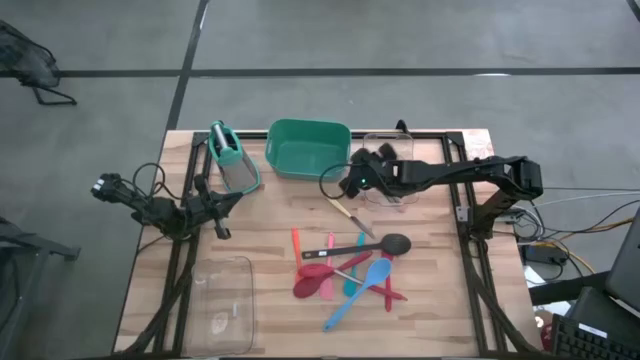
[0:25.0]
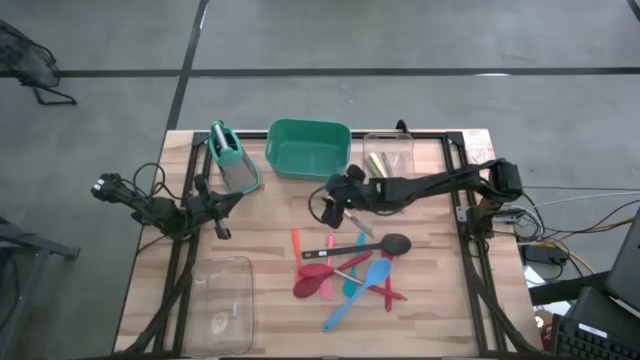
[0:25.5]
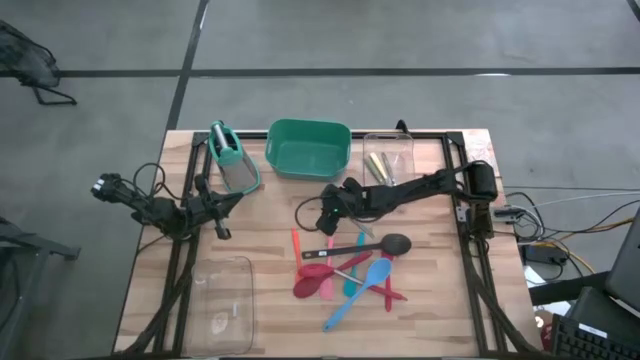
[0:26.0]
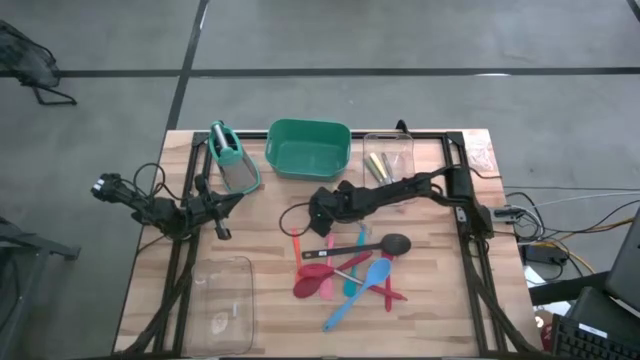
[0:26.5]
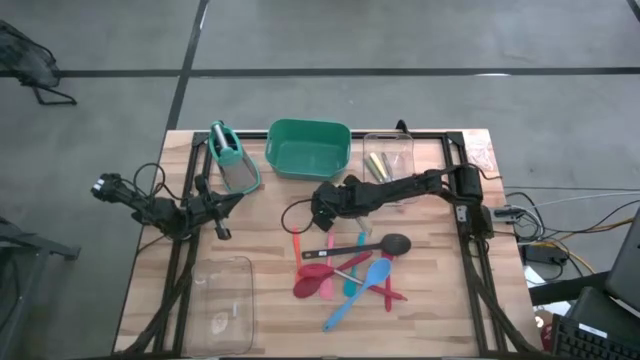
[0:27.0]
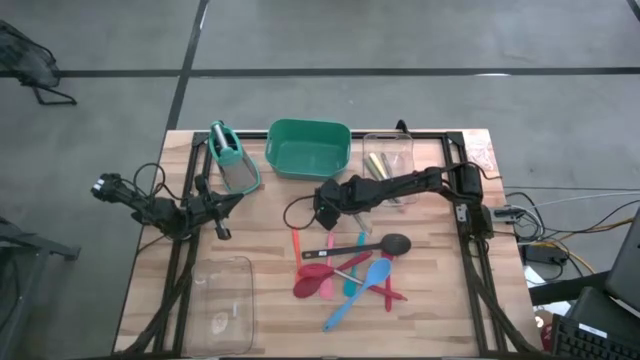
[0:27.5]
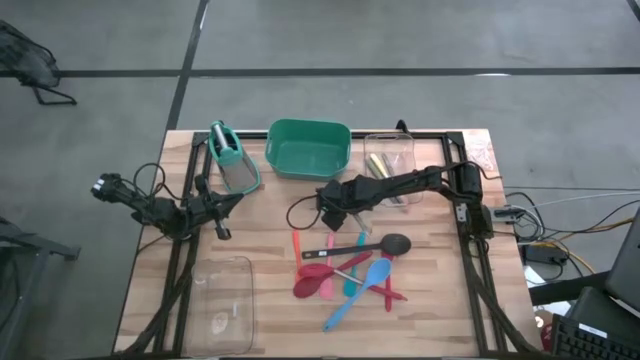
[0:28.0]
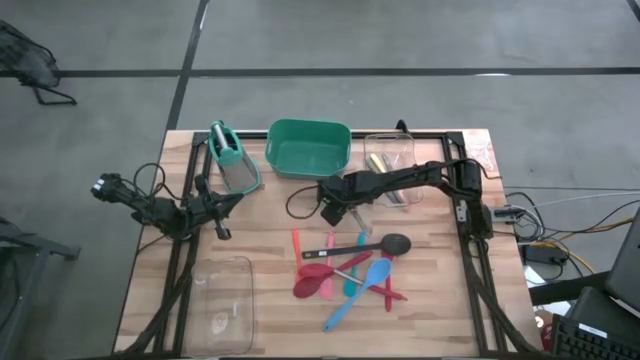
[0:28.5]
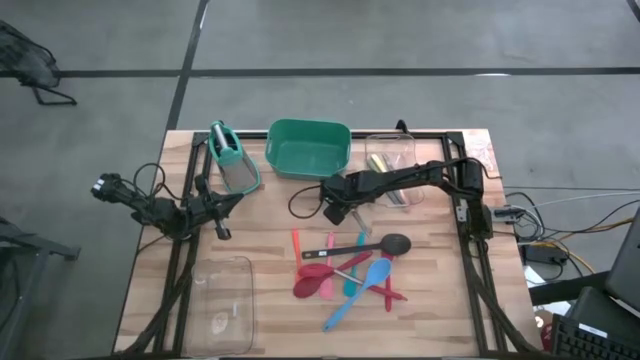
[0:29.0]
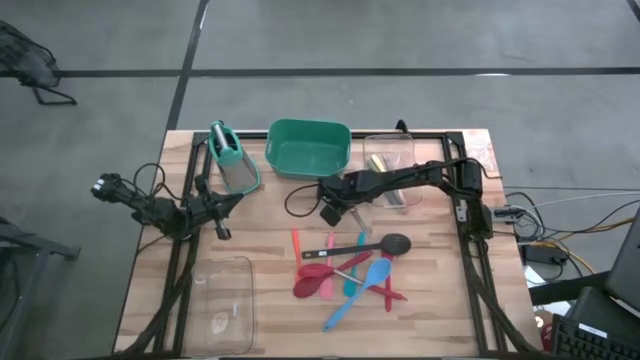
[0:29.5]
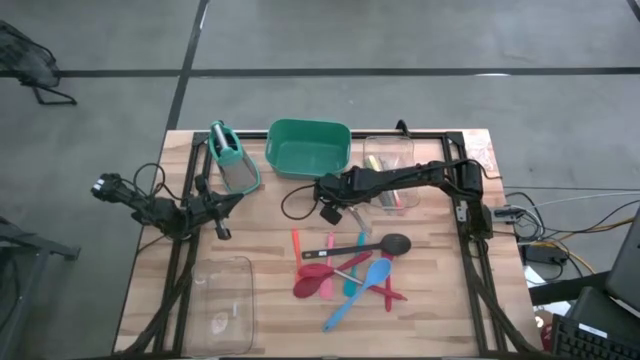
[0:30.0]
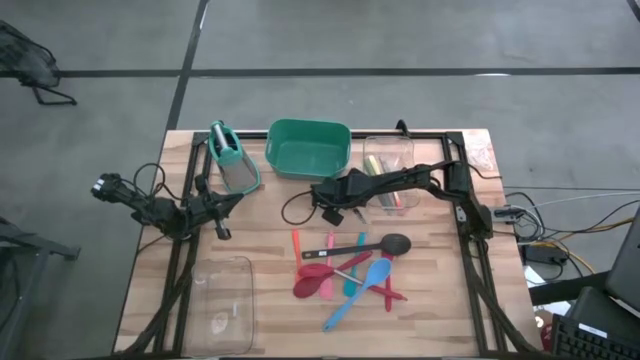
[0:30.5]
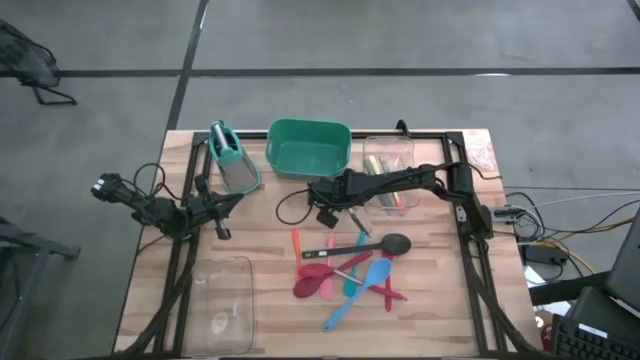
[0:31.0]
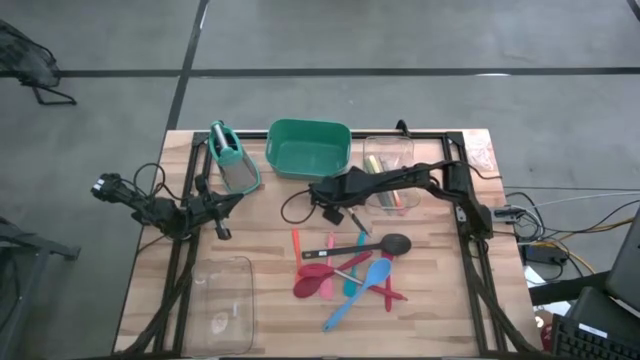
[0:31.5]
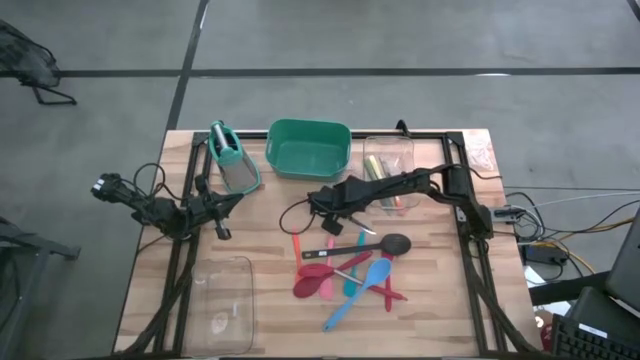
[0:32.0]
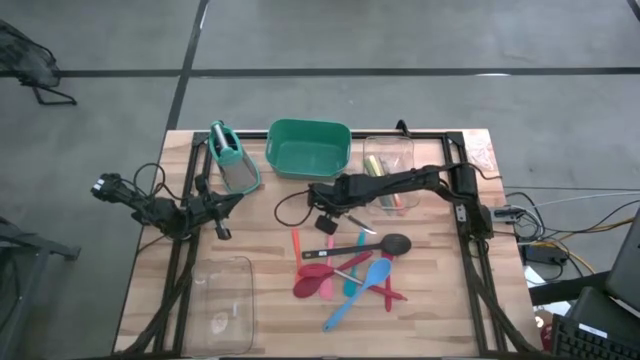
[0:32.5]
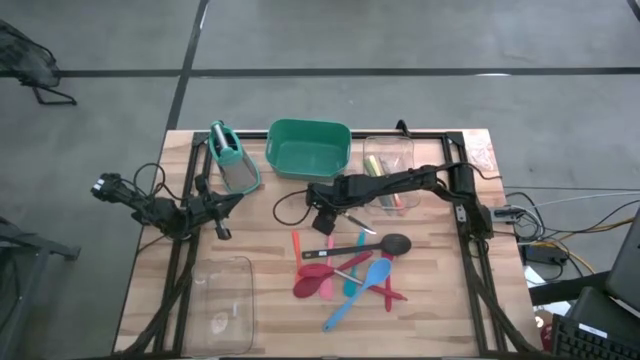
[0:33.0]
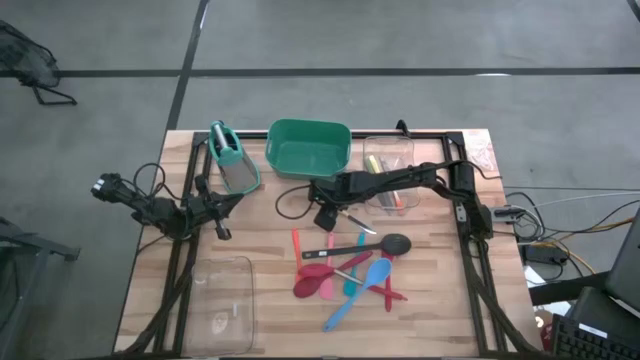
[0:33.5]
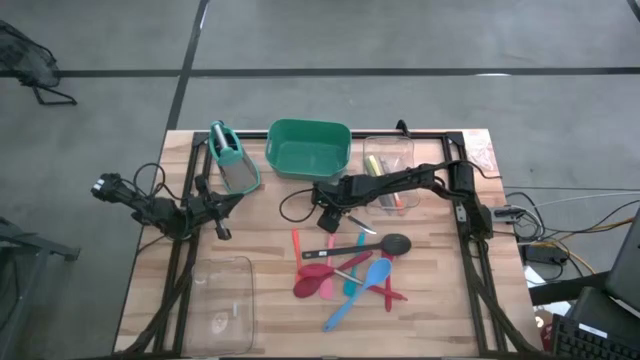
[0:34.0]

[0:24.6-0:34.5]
Task: Pick & Place Kitchen Items
Put the yellow knife into the top transparent bin

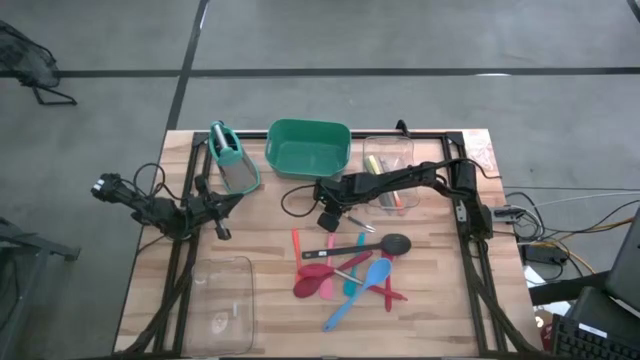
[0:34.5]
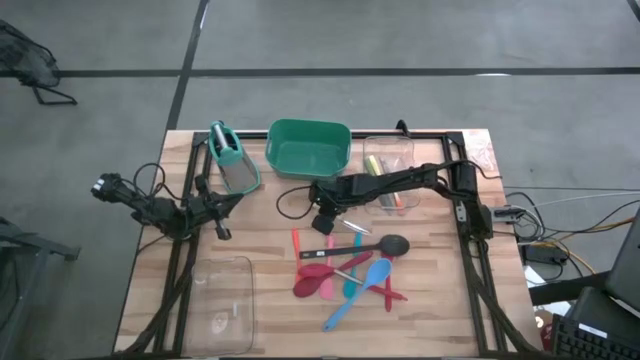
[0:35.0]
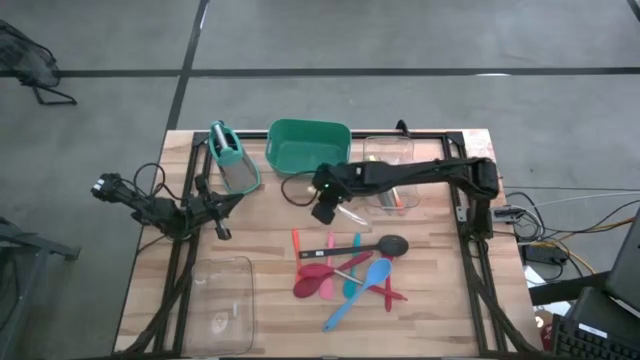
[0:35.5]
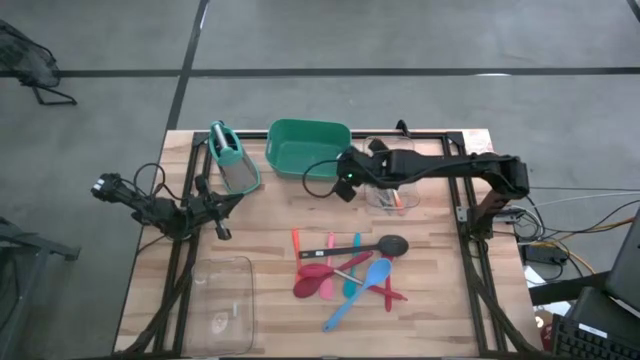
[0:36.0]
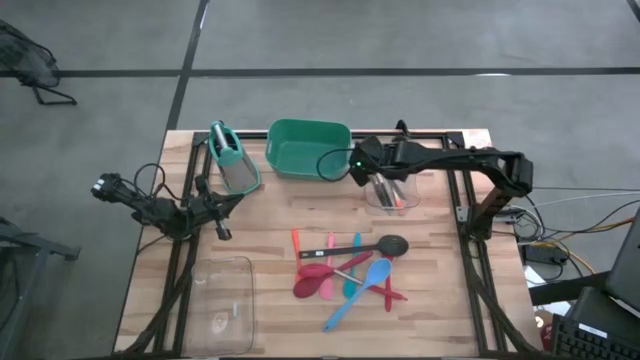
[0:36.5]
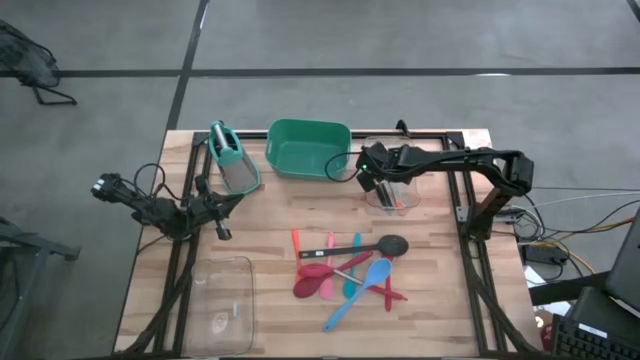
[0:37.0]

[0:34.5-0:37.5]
Put the yellow knife into the top transparent bin

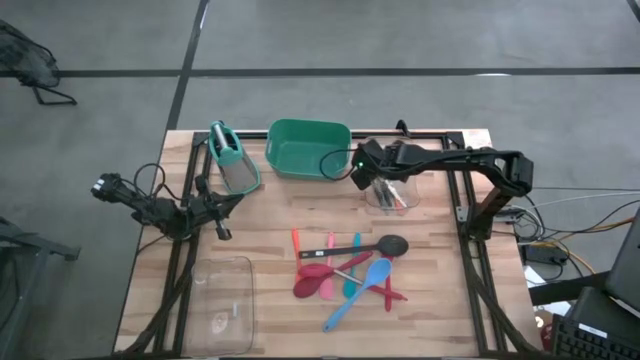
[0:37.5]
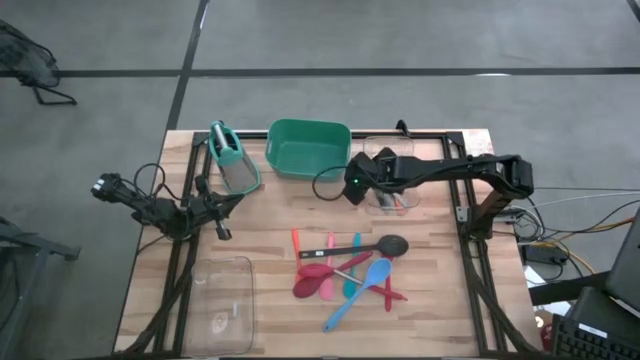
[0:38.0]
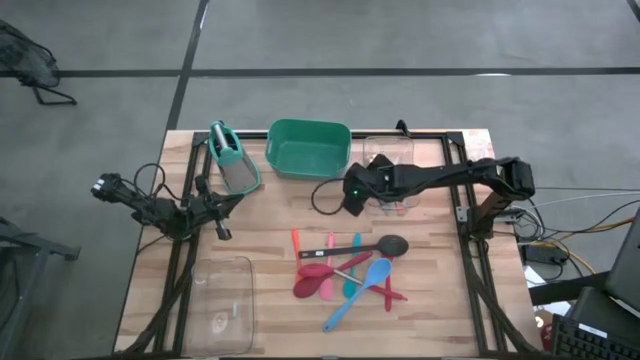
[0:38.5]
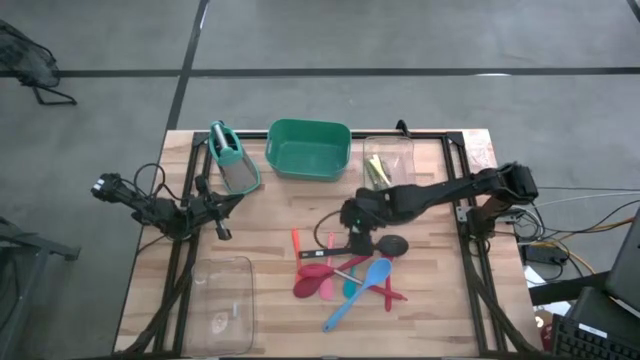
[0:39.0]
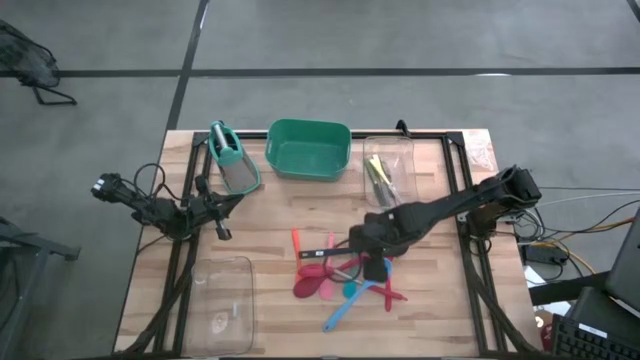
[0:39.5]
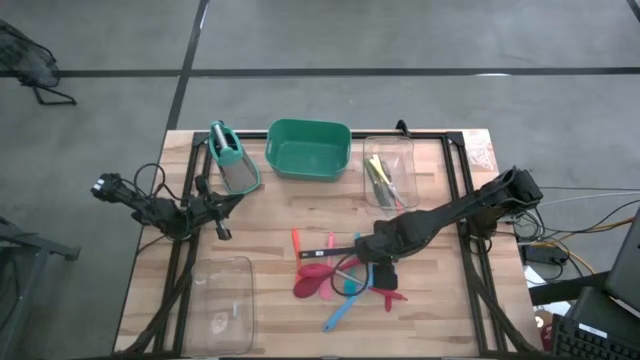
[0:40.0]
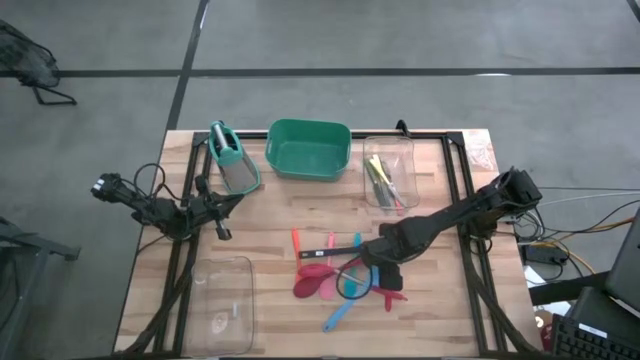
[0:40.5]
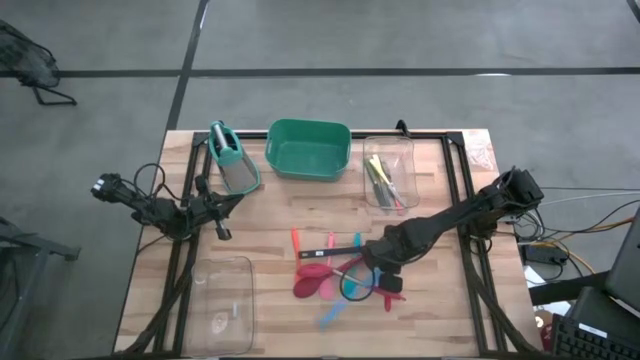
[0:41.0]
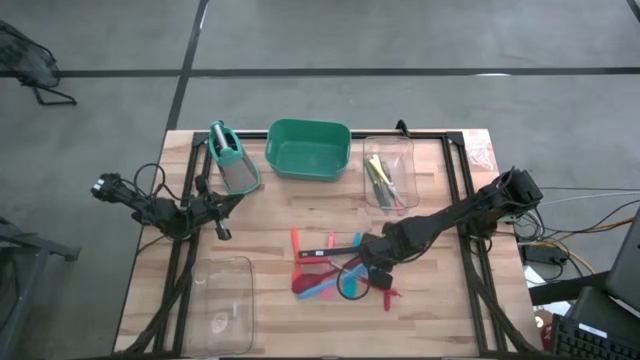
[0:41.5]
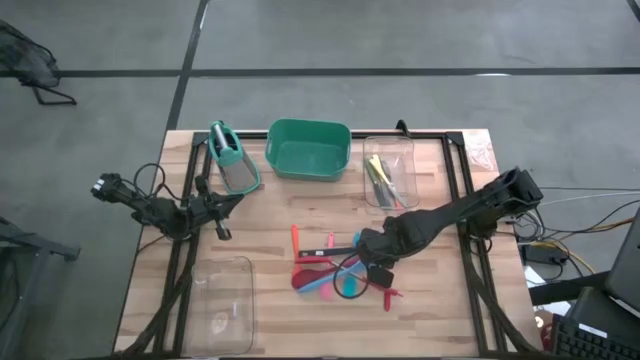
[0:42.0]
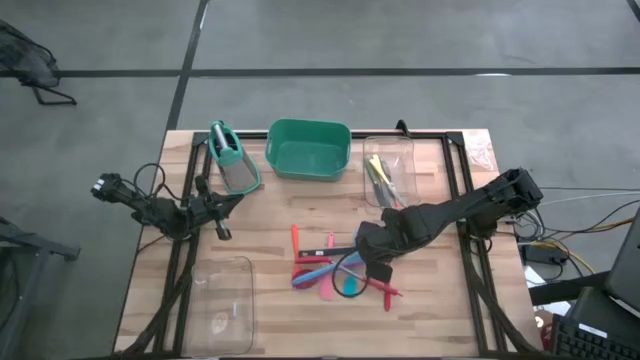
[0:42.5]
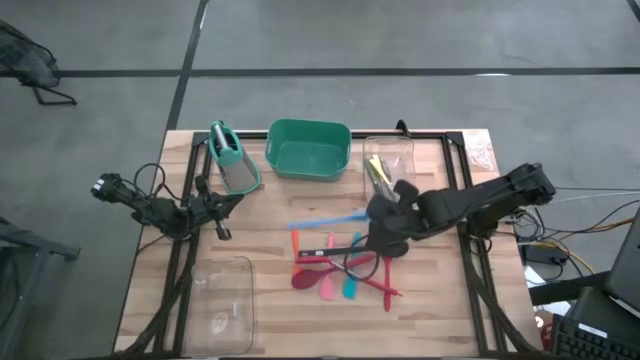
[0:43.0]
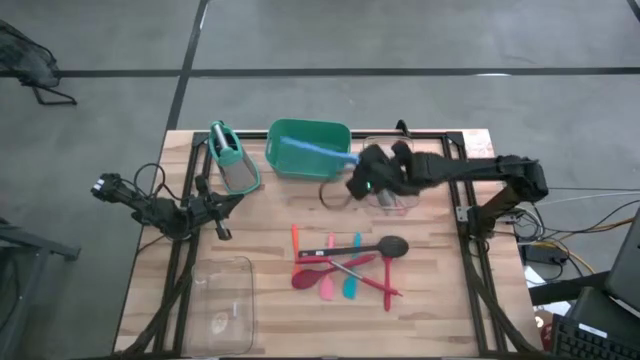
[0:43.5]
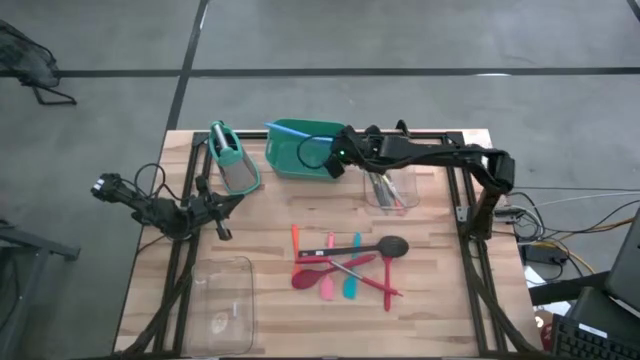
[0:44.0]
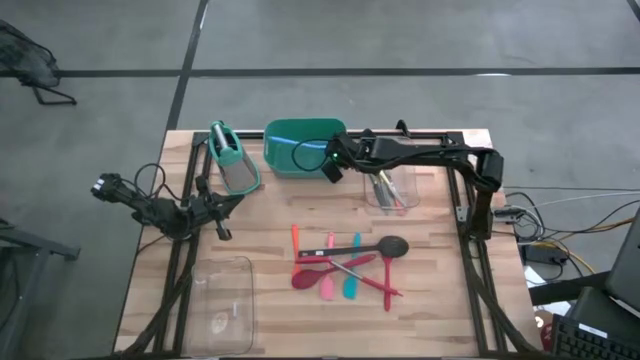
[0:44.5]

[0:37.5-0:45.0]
Put the blue serving spoon into the green bin

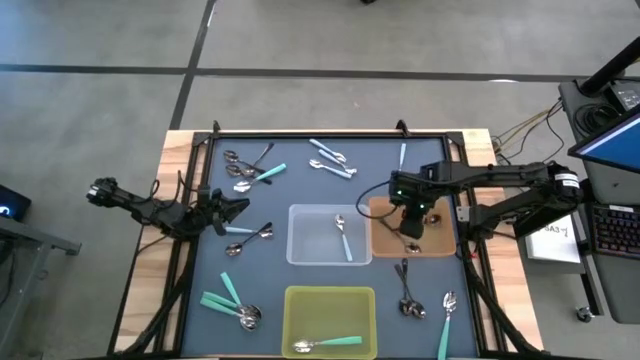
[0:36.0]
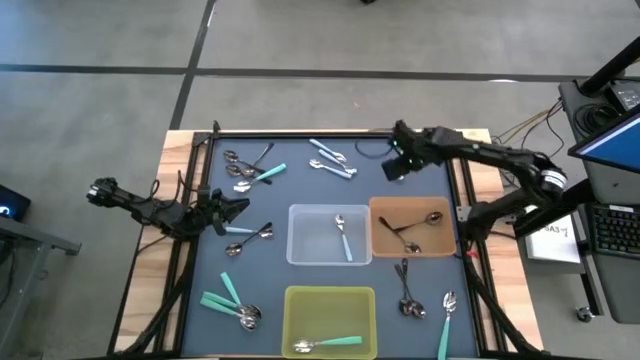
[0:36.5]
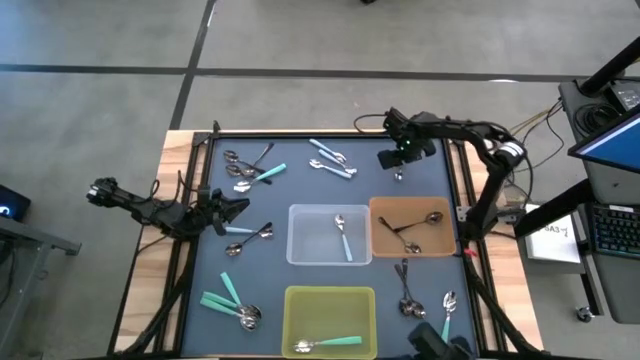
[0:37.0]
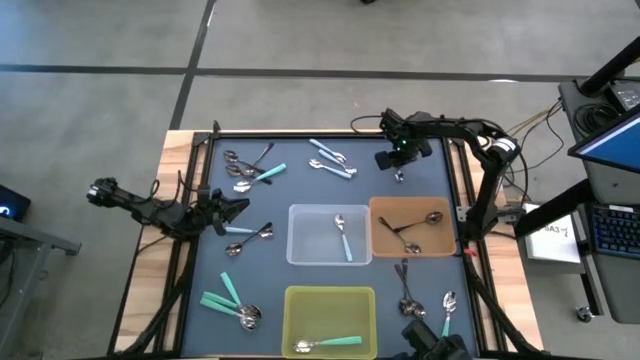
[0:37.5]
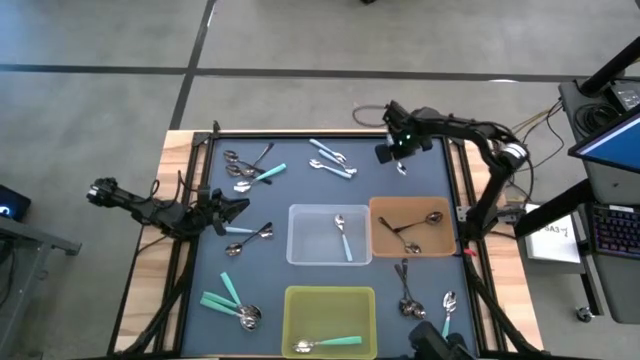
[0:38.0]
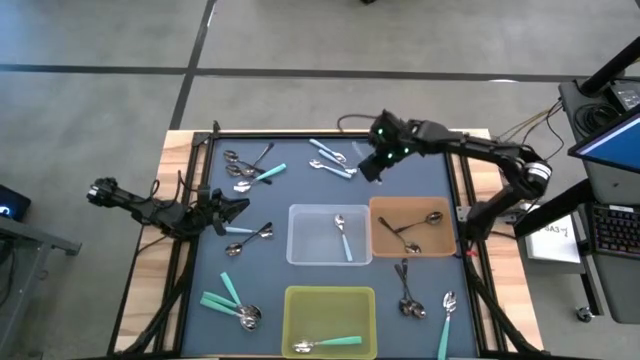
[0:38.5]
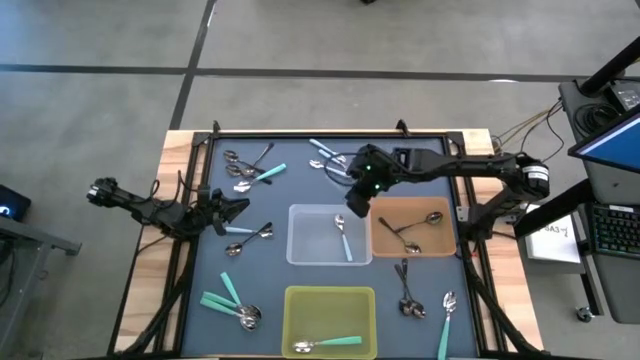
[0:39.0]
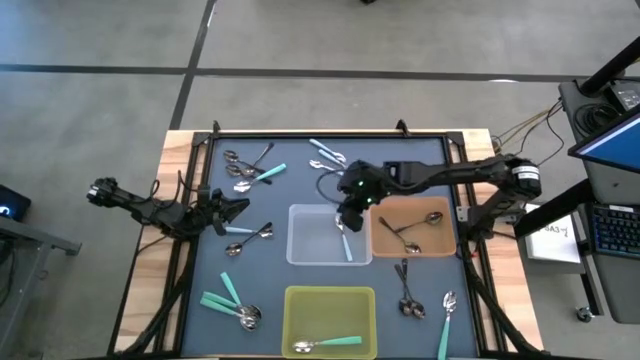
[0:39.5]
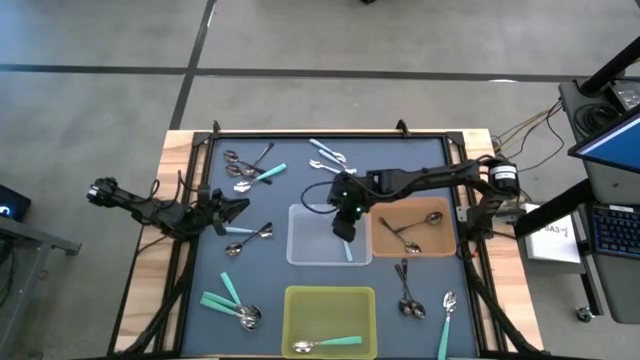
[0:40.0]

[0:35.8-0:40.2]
Task: Sort silverware by color (type)
Put the light blue spoon into the transparent bin
